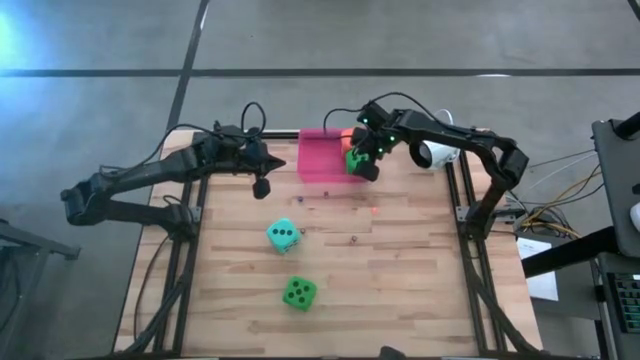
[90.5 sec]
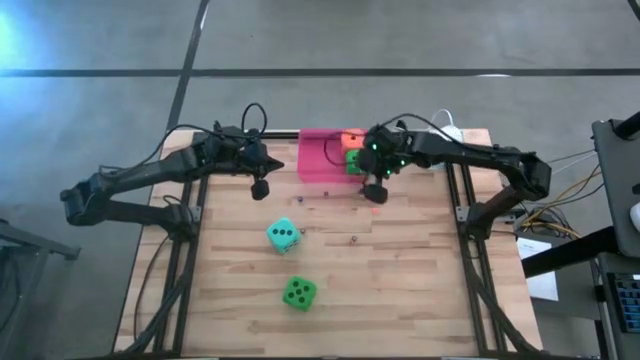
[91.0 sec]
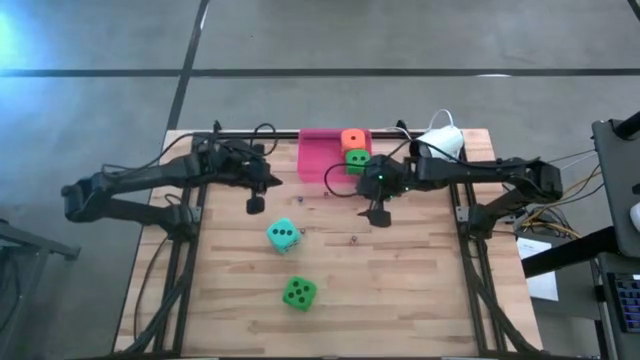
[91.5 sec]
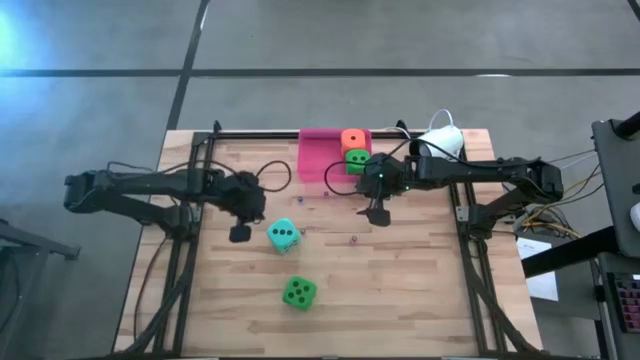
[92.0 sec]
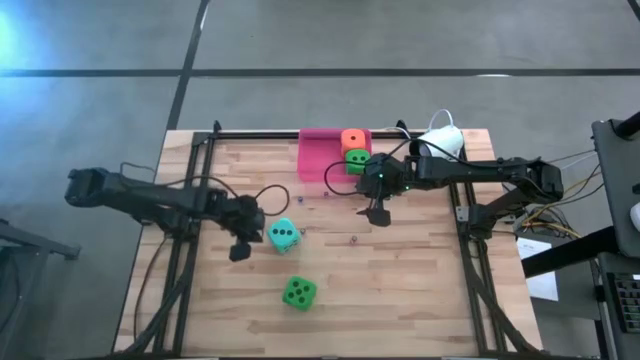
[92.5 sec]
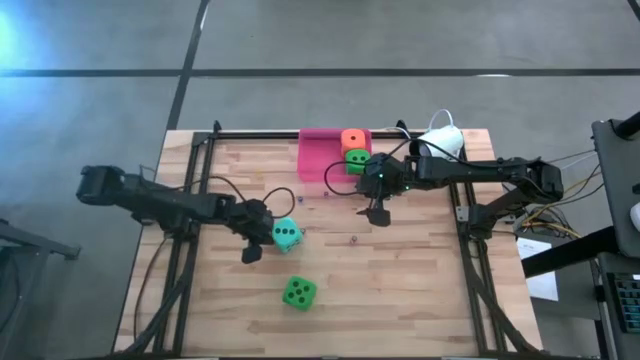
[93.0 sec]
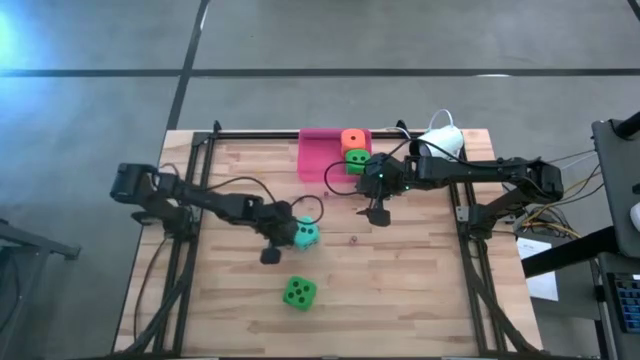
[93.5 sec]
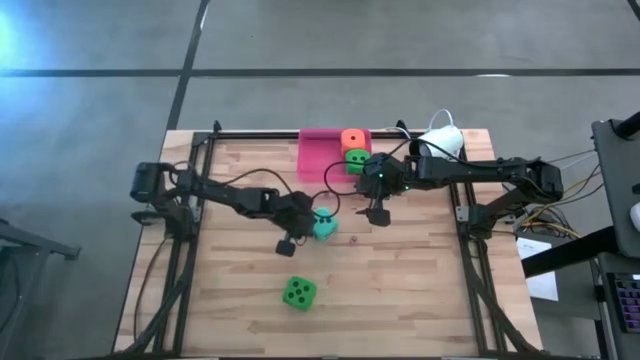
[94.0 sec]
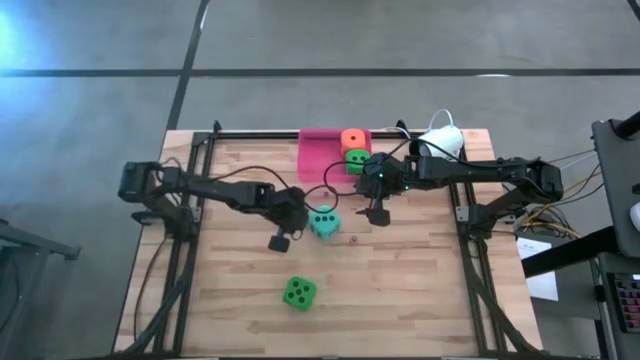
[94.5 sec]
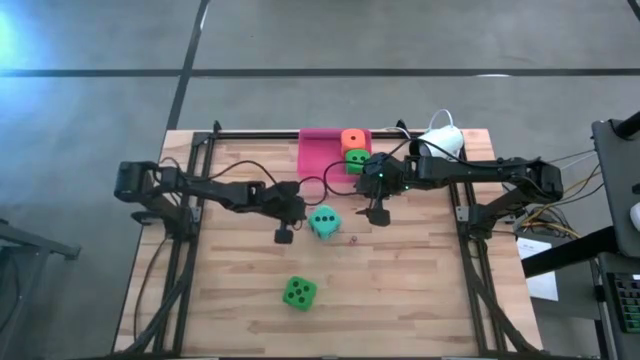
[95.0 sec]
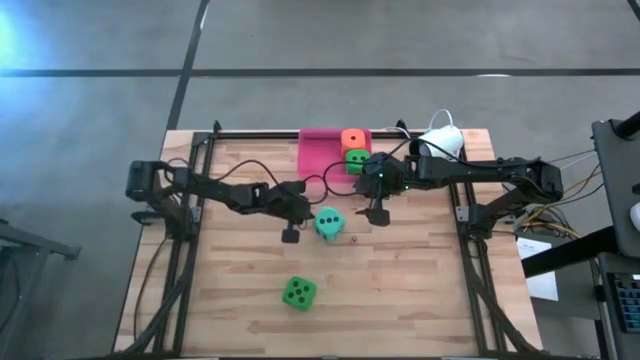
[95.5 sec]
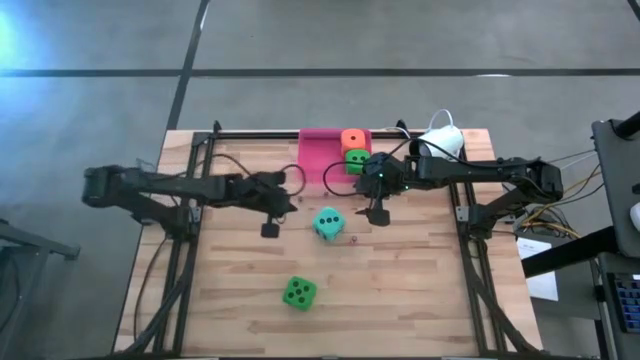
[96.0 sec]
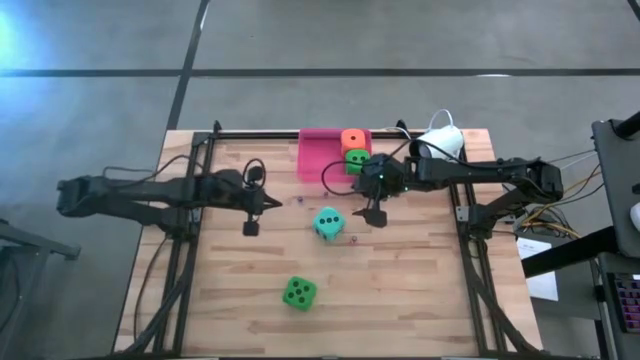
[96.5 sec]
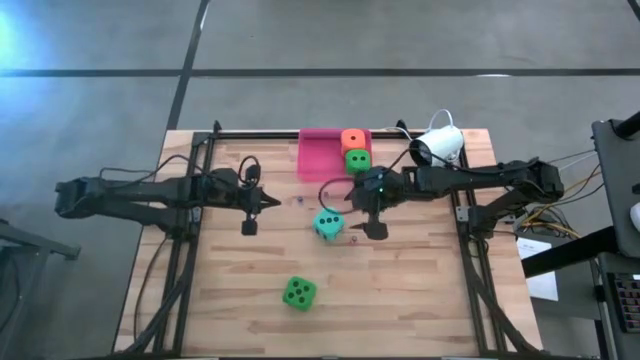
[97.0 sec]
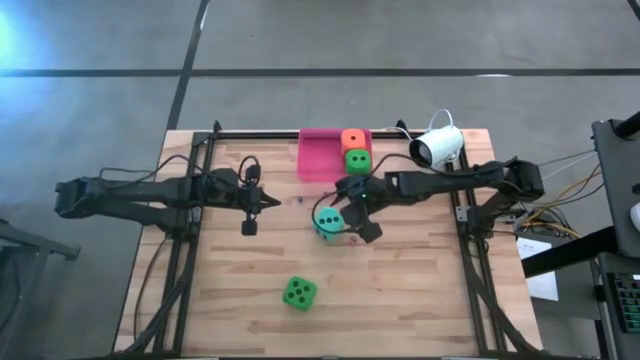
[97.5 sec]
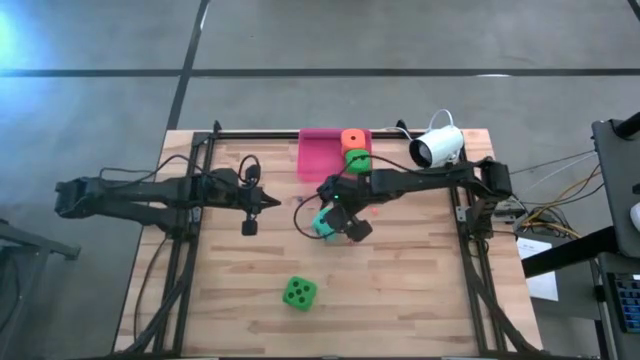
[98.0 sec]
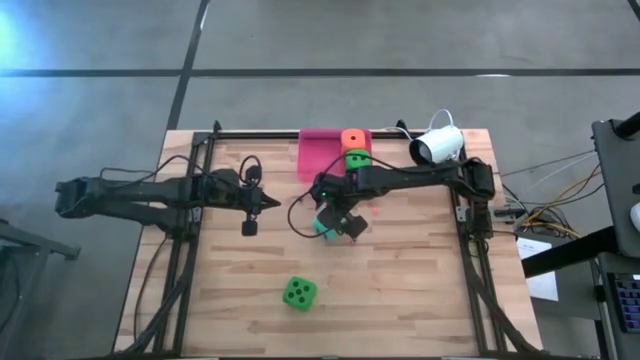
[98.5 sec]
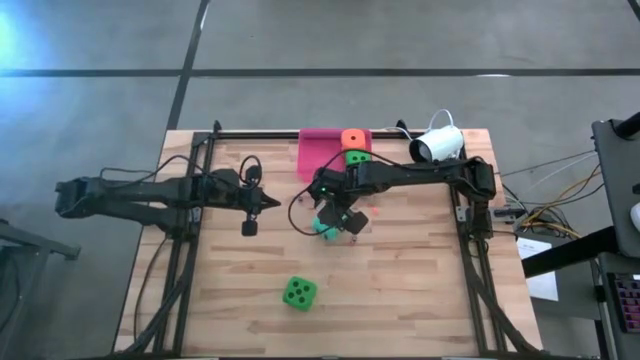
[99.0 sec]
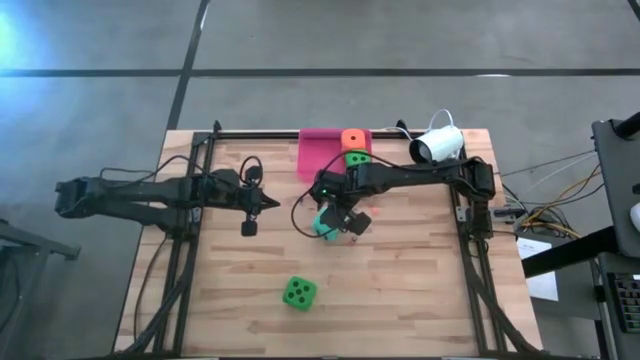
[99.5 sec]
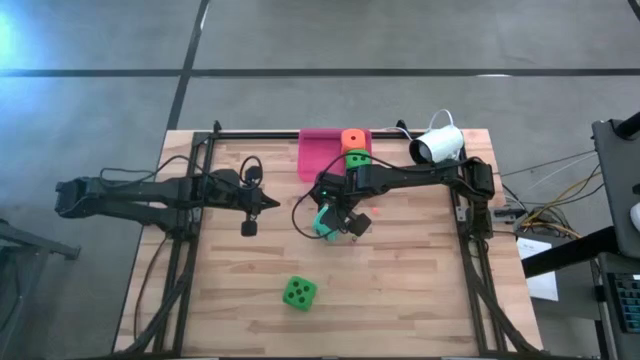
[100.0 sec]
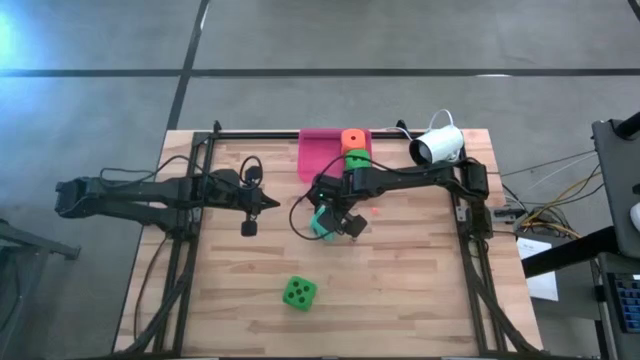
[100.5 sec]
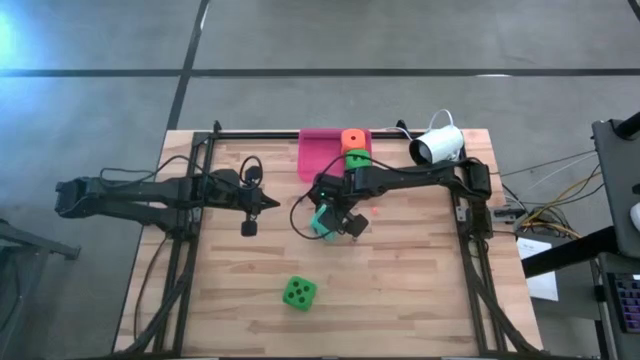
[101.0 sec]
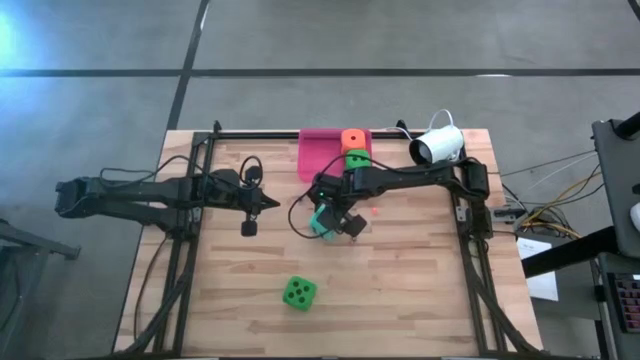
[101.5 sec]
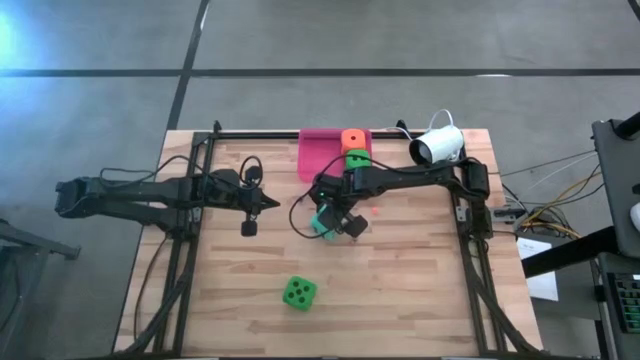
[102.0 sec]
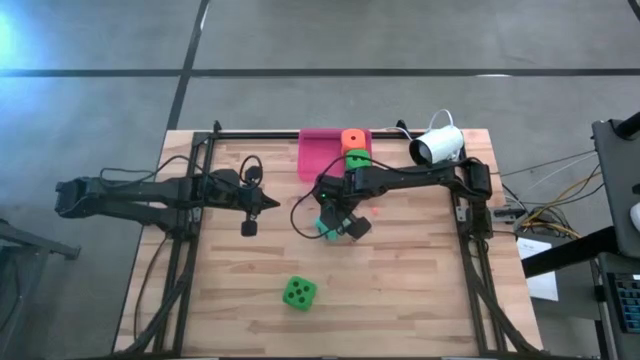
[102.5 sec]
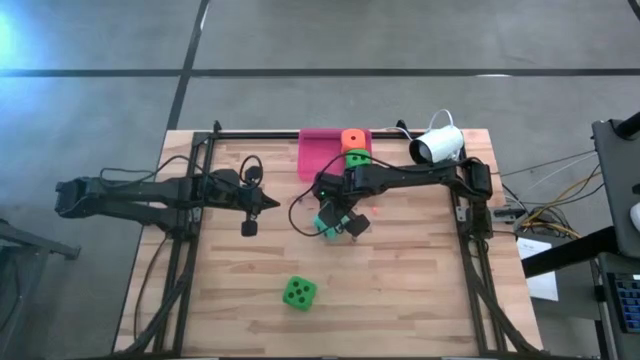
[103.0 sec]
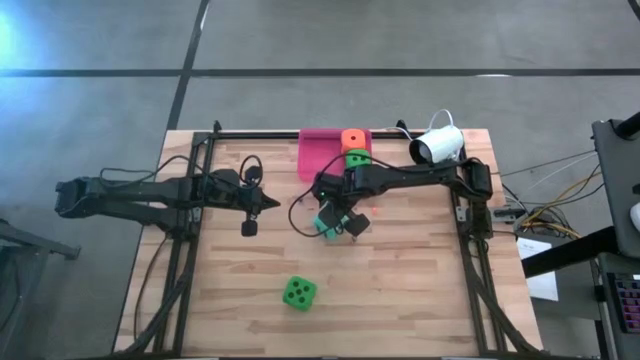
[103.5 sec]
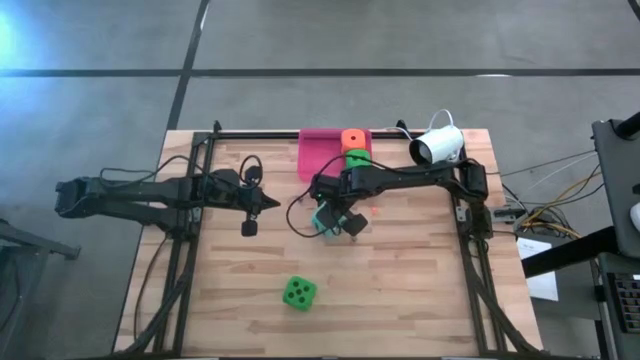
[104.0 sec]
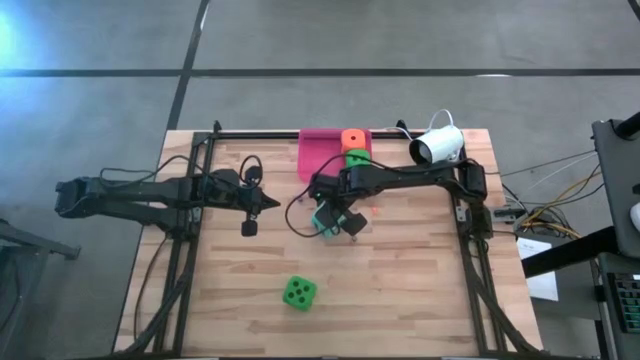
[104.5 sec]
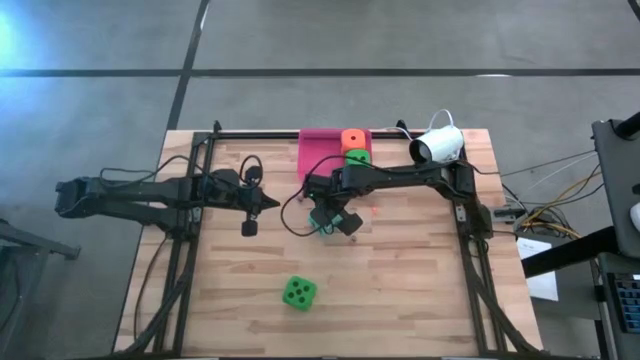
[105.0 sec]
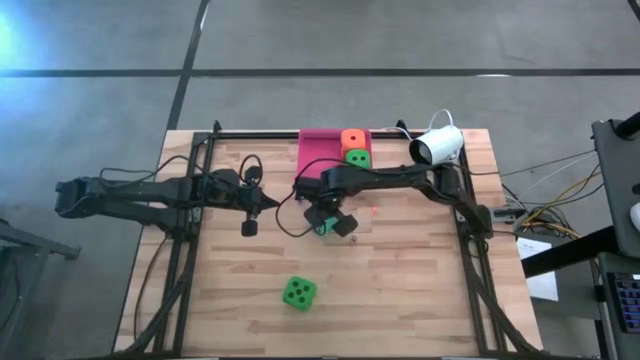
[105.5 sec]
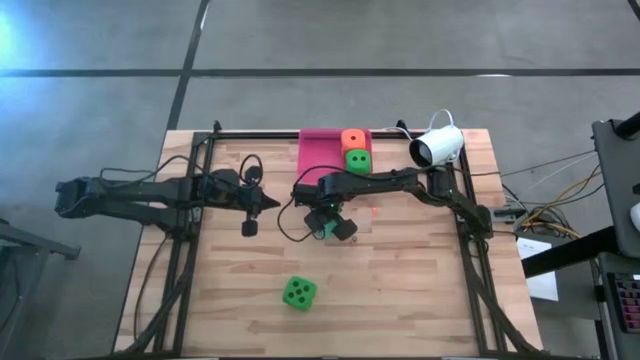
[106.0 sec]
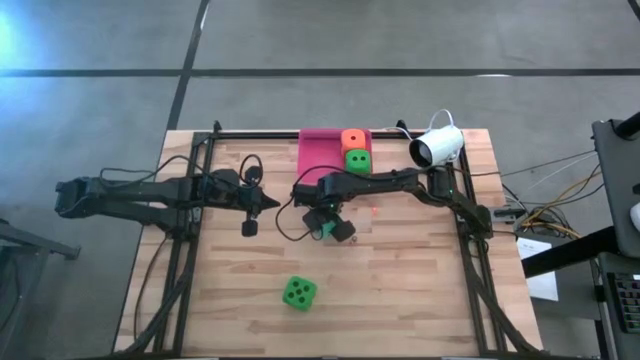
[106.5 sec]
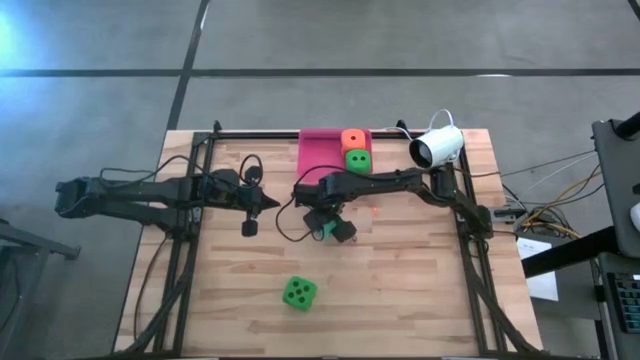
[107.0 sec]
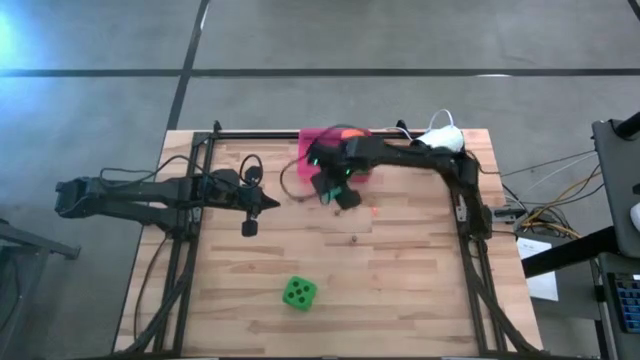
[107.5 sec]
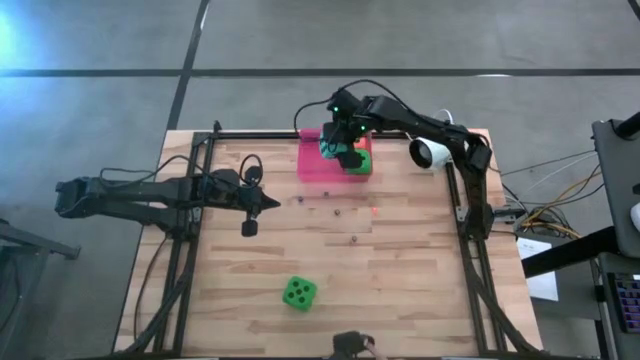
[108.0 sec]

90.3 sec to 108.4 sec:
Task: Pick & Place Dice
Put the large blue dice into the the pink bin

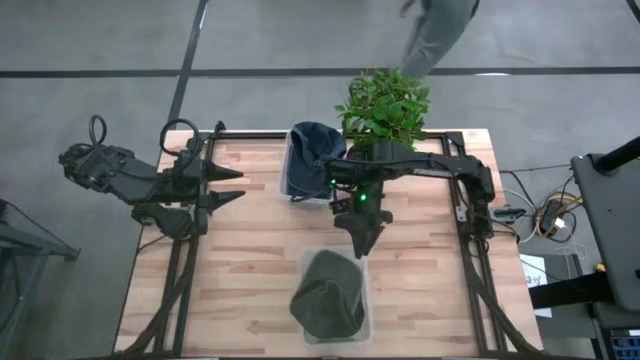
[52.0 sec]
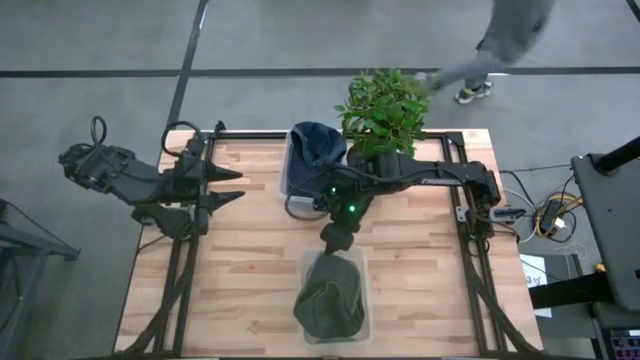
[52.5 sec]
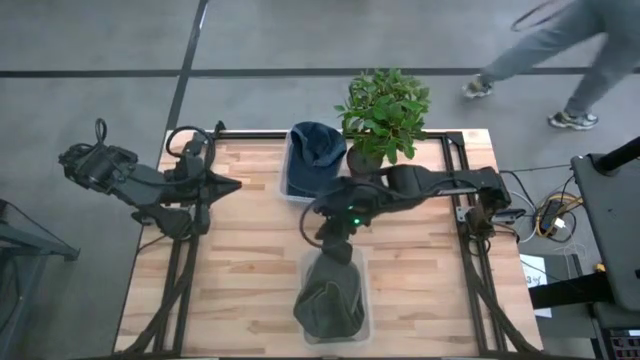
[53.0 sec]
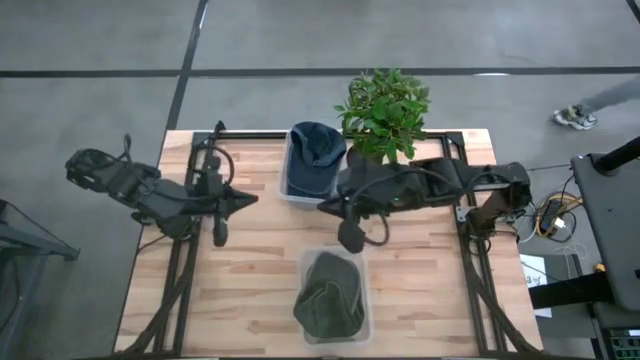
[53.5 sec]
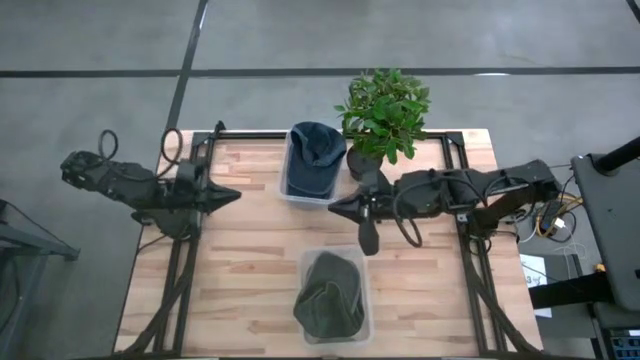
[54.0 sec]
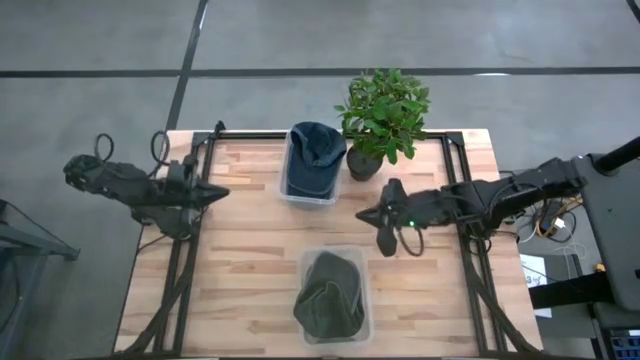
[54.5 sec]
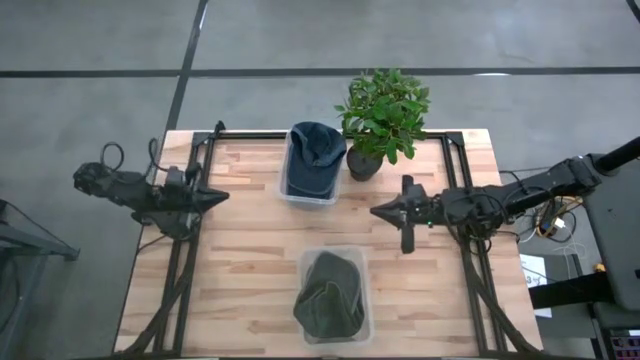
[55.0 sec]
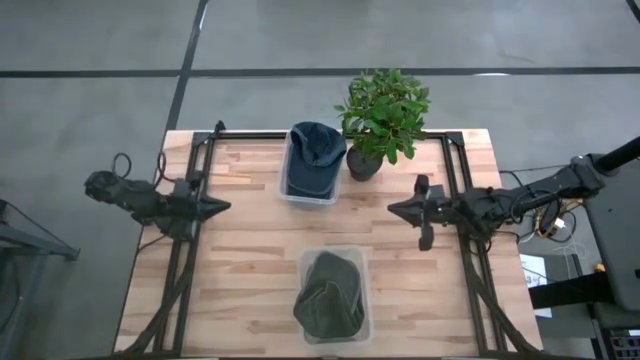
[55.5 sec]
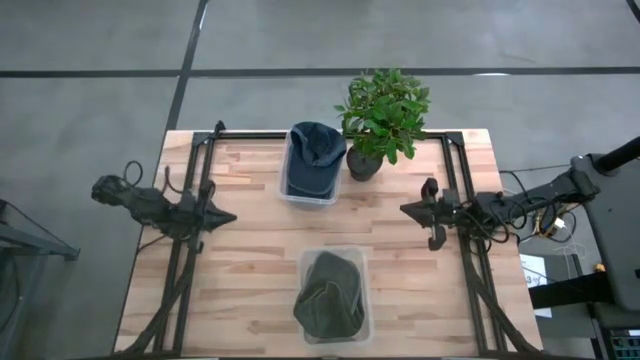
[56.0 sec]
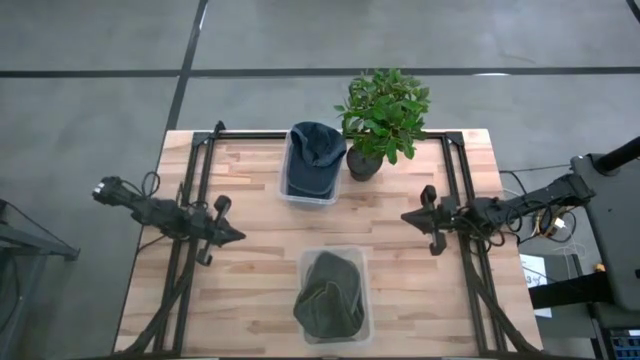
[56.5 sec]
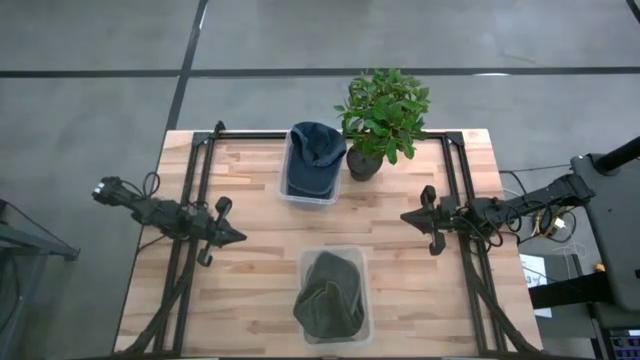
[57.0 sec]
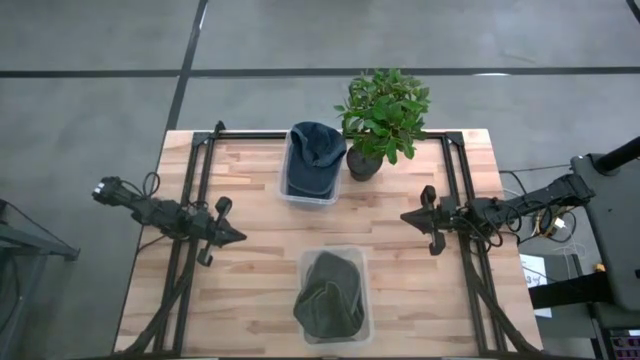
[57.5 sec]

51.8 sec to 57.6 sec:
Task: Pick & Place hat
Return to Home Position
